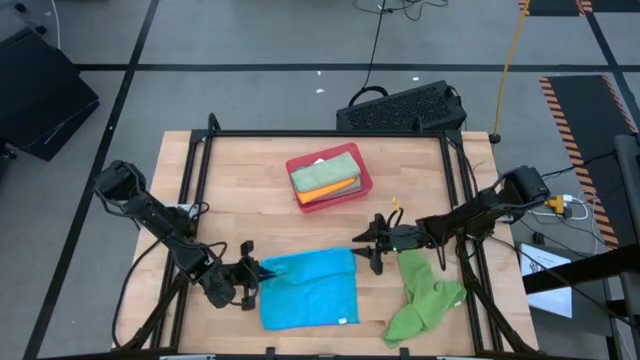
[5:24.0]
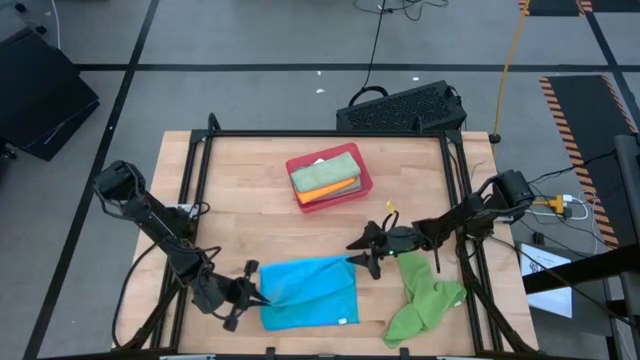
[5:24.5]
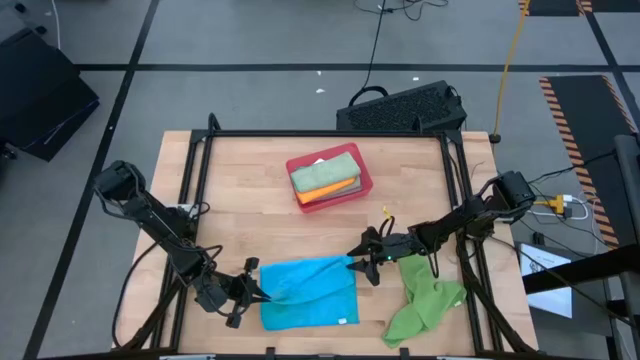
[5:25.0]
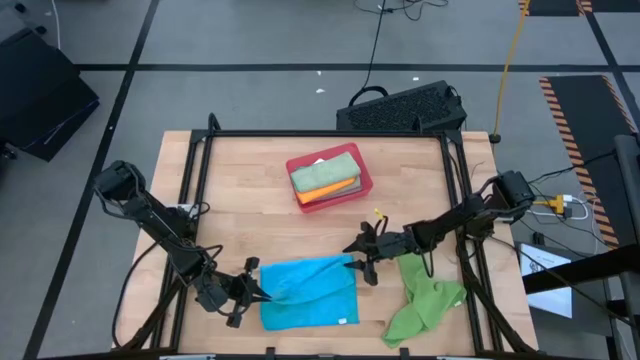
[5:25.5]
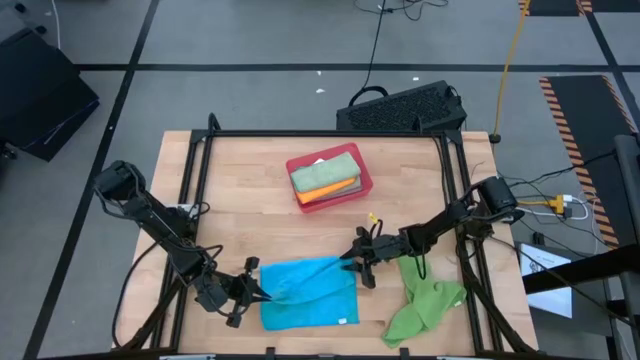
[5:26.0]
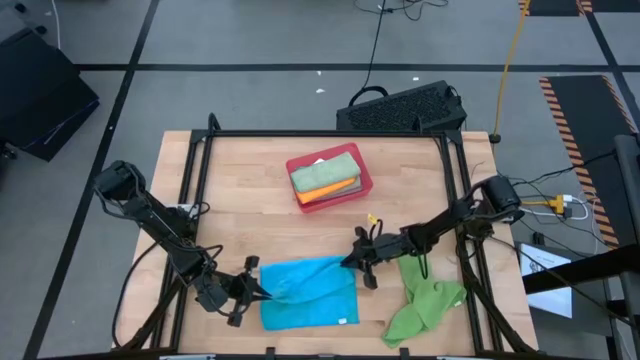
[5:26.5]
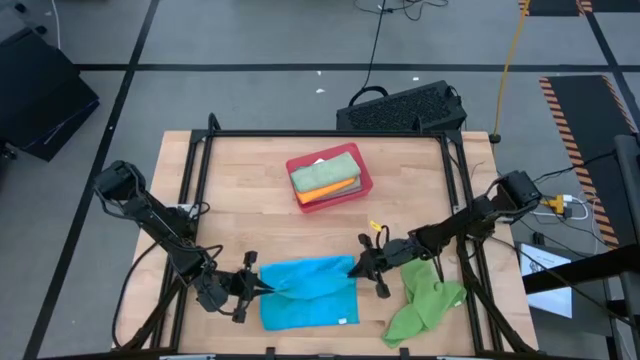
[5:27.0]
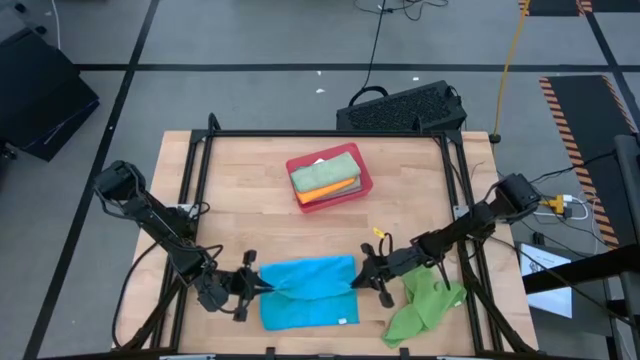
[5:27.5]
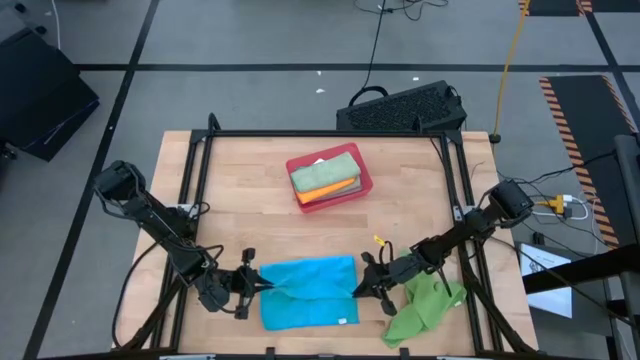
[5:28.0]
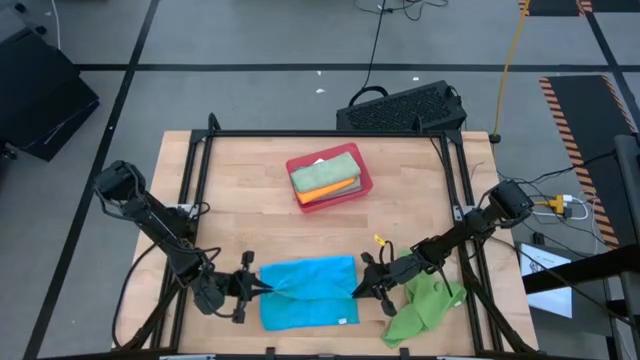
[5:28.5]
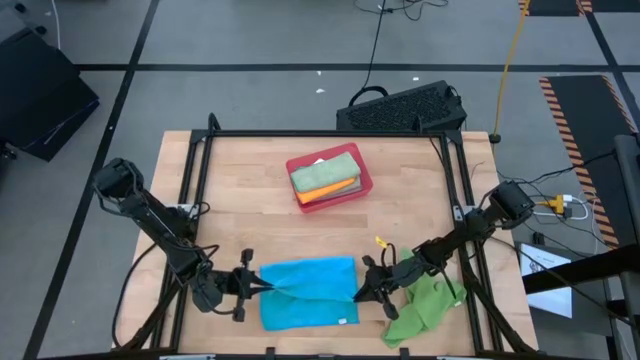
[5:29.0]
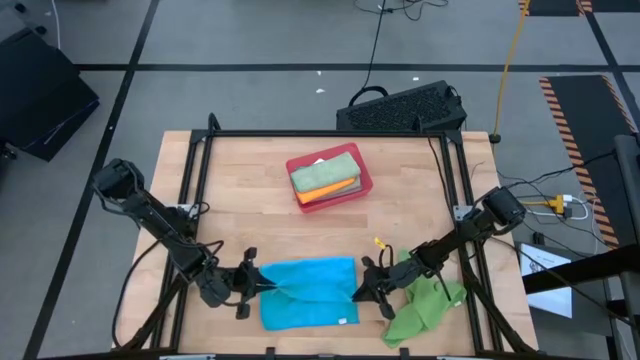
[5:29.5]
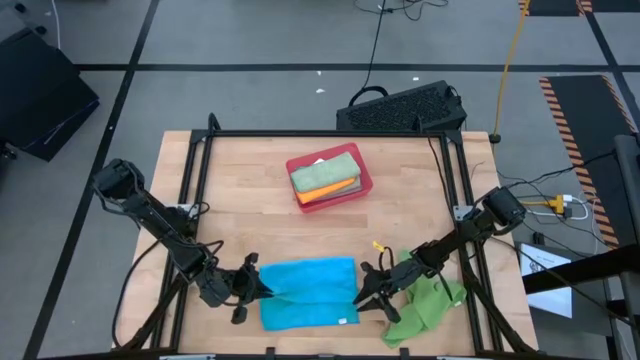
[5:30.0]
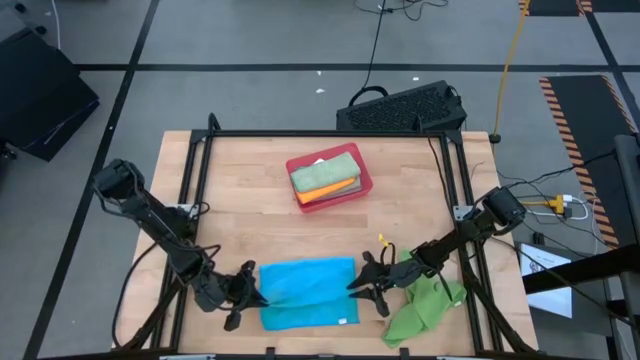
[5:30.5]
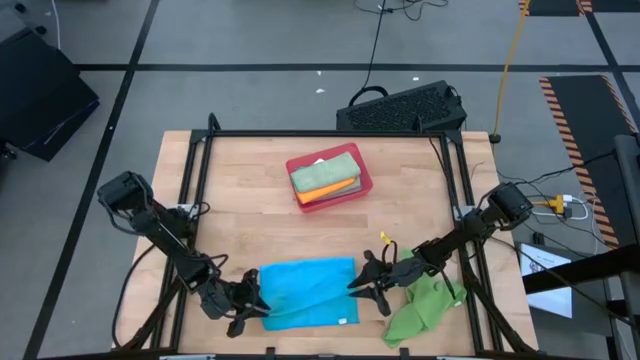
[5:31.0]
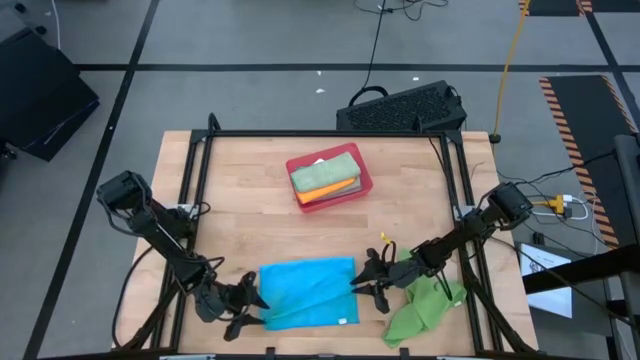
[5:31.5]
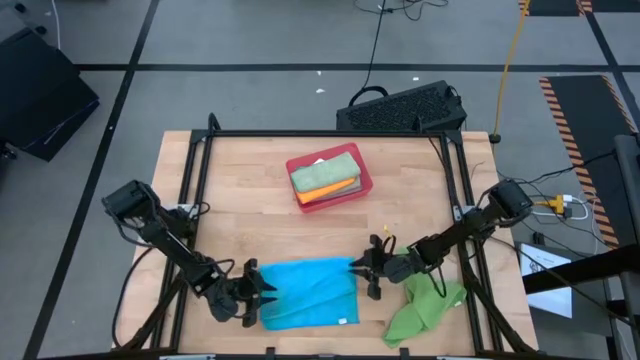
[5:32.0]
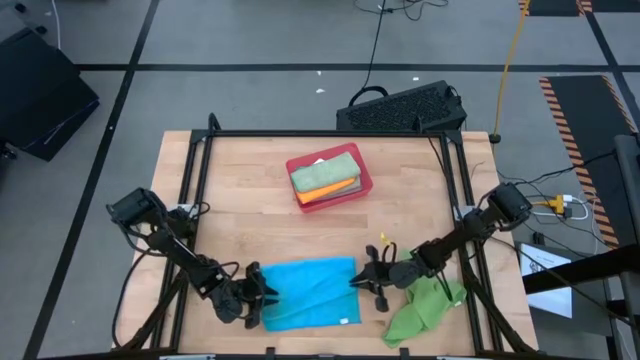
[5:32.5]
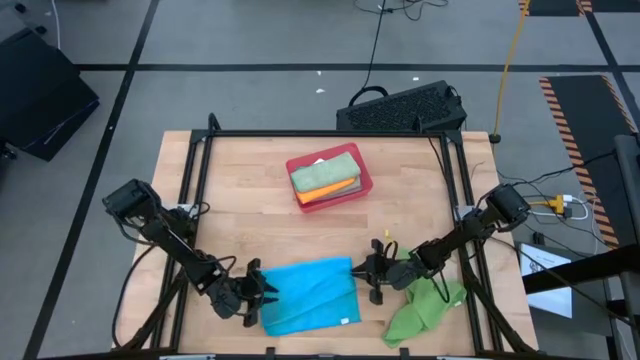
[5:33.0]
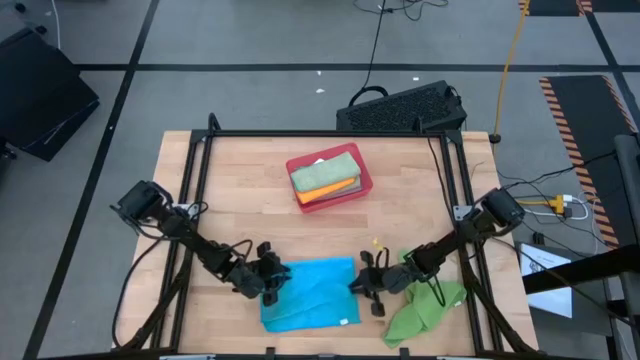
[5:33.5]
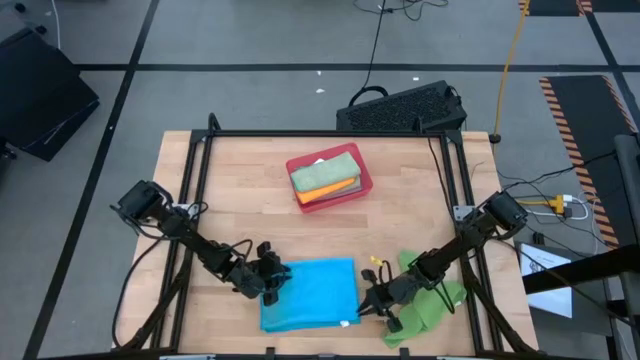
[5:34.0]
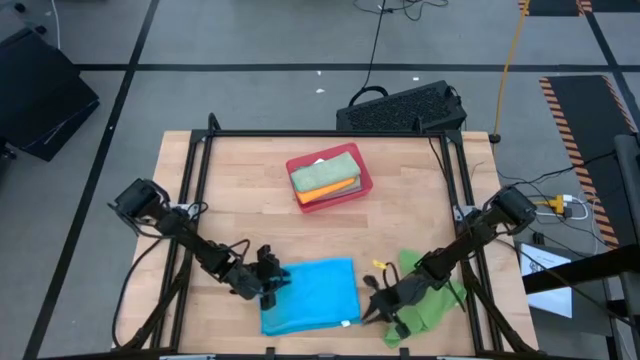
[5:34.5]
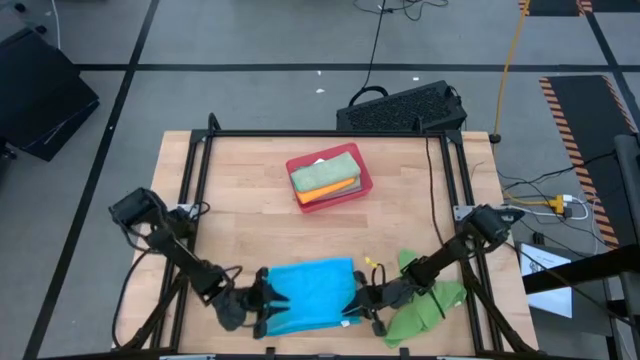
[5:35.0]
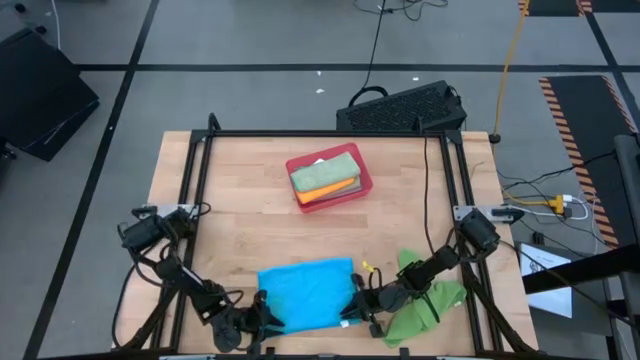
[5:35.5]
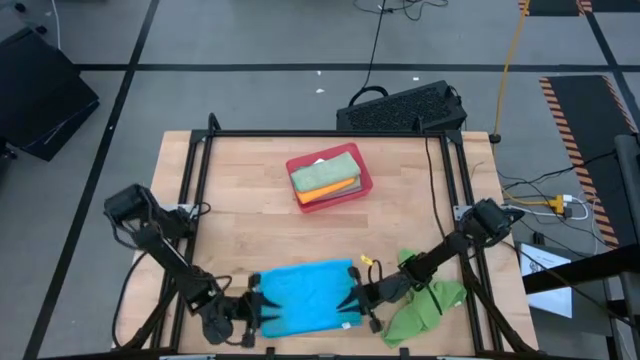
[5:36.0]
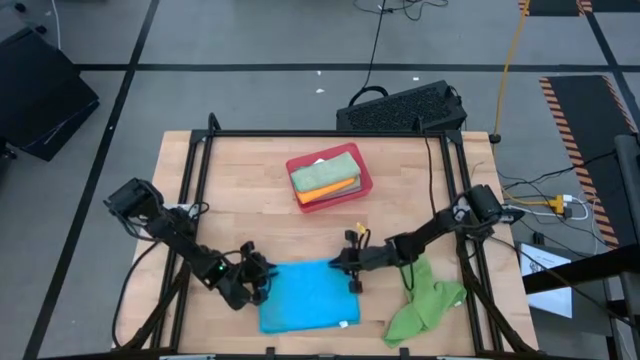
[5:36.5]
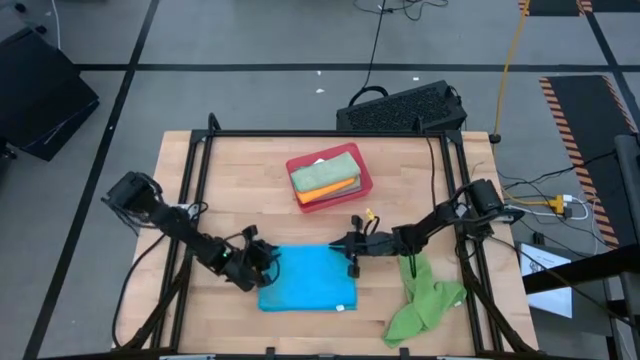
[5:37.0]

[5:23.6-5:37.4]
Task: Fold microfiber towels
Fold the blue microfiber cloth
